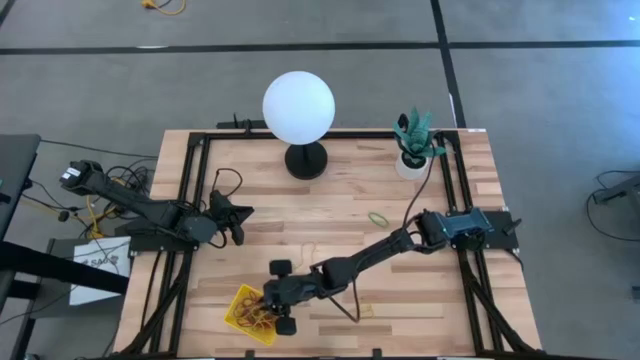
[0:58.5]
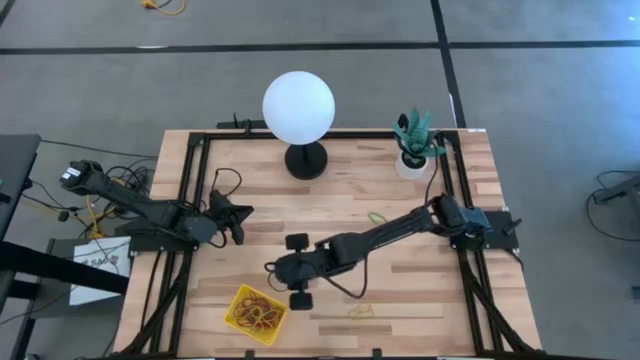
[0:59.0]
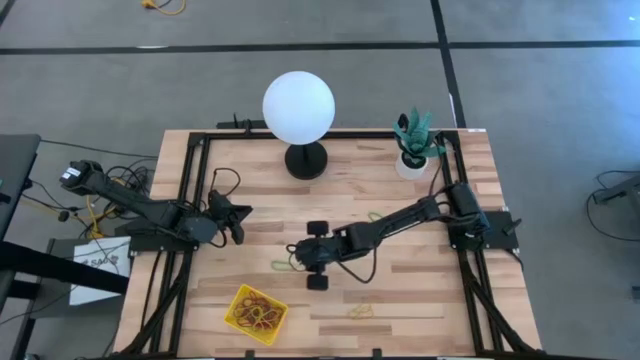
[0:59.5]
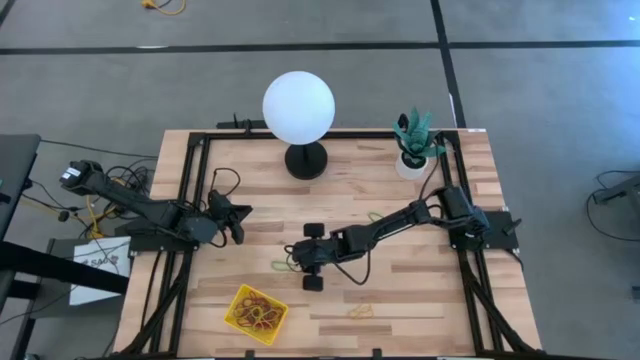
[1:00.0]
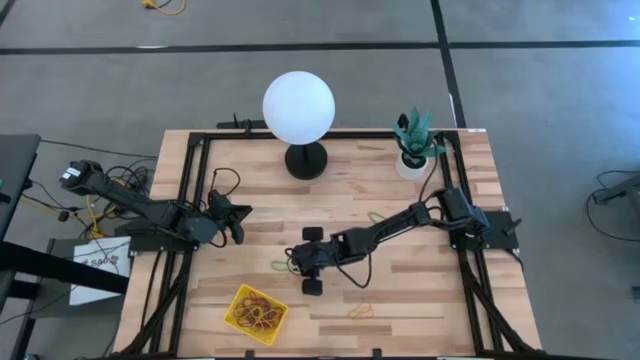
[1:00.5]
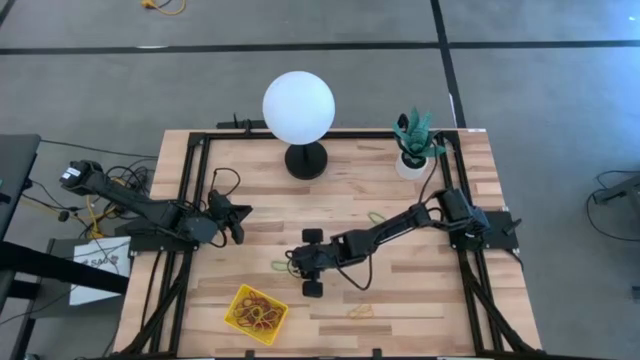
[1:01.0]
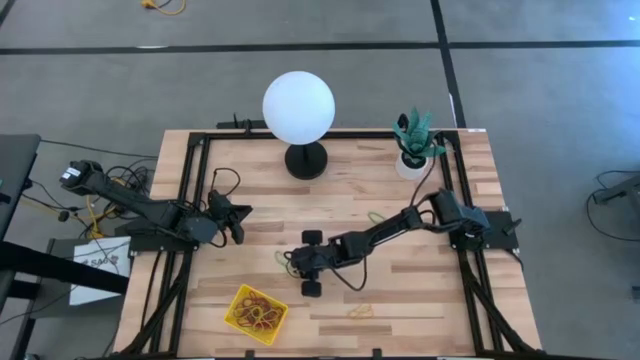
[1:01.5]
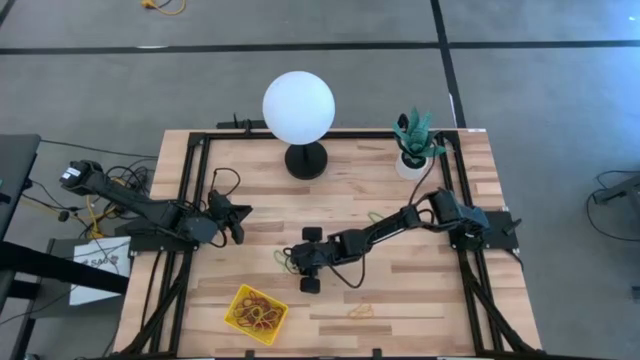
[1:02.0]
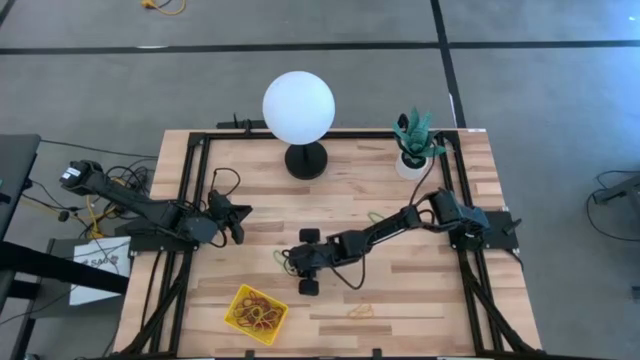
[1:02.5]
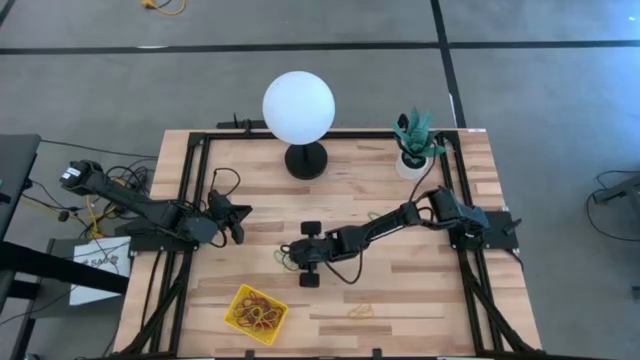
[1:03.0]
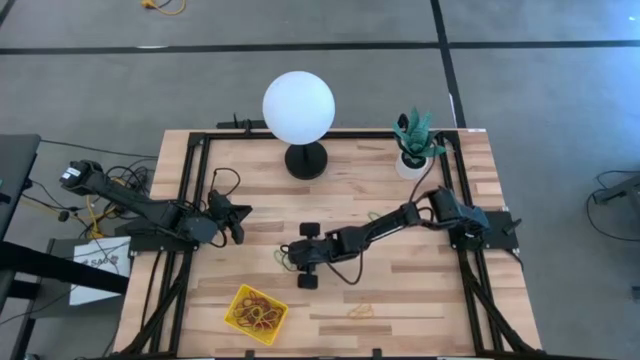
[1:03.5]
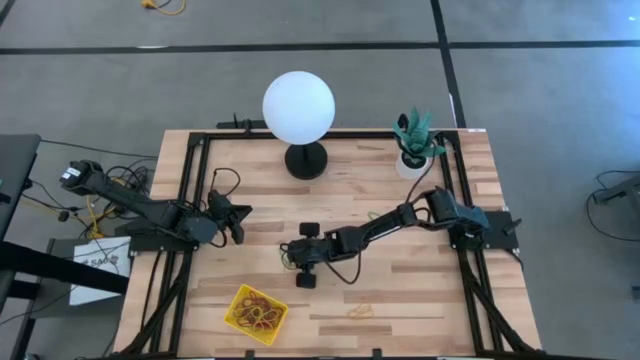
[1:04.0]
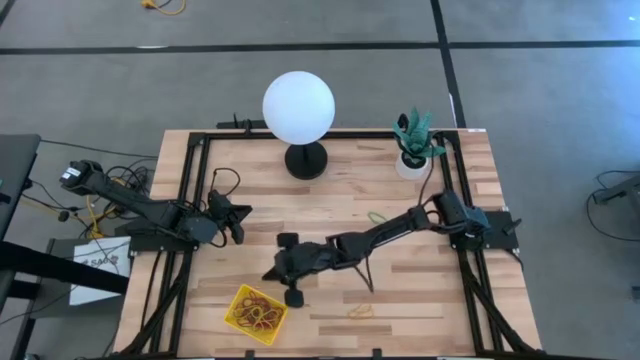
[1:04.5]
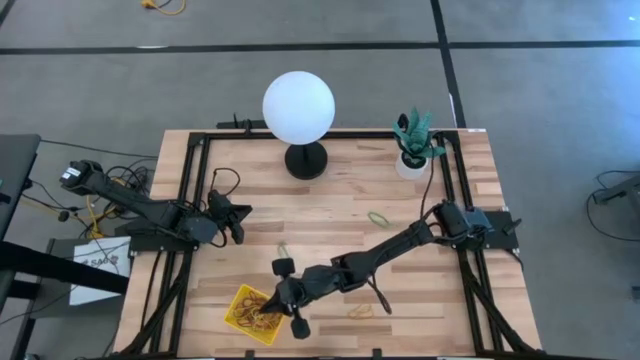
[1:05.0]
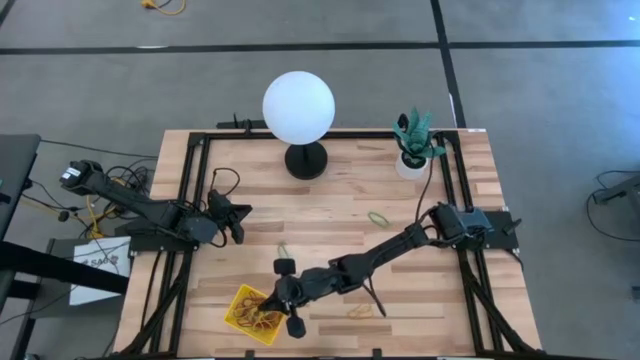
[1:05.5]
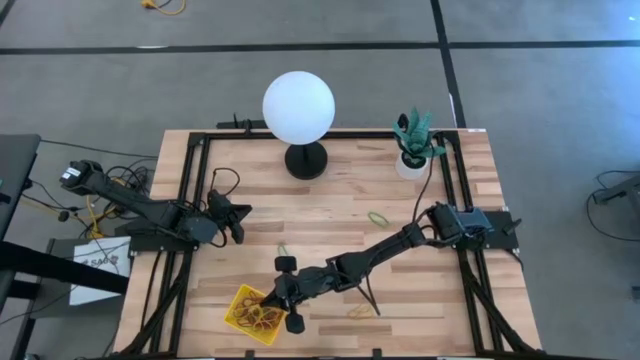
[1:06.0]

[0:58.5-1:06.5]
Task: Pick and place items into bin
Put the yellow rubber band into the yellow bin

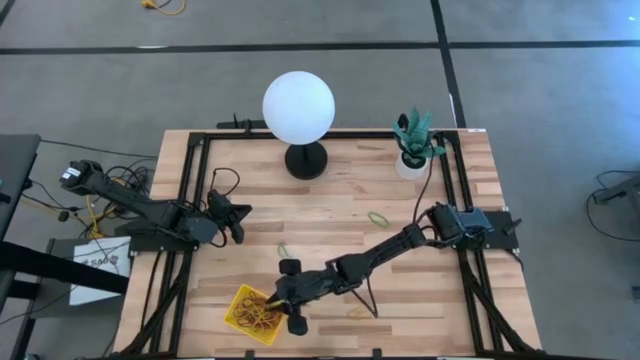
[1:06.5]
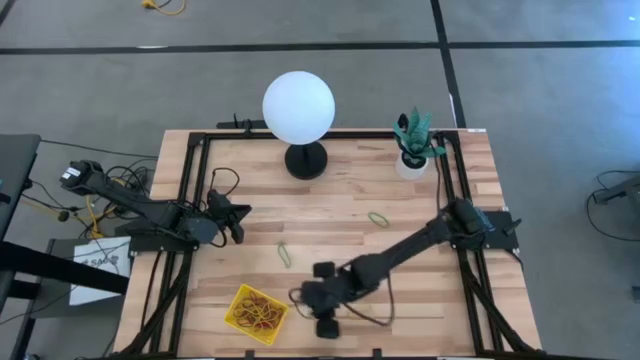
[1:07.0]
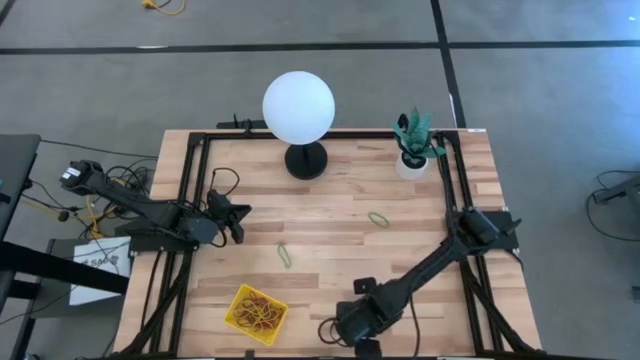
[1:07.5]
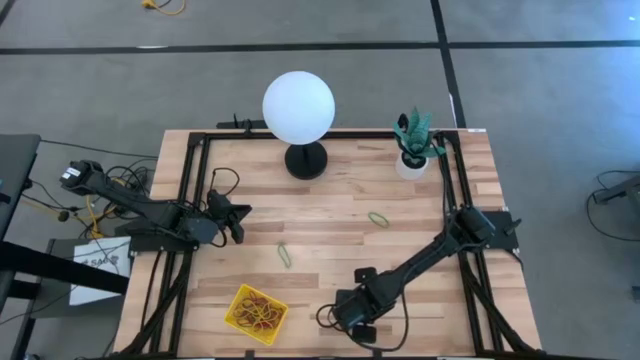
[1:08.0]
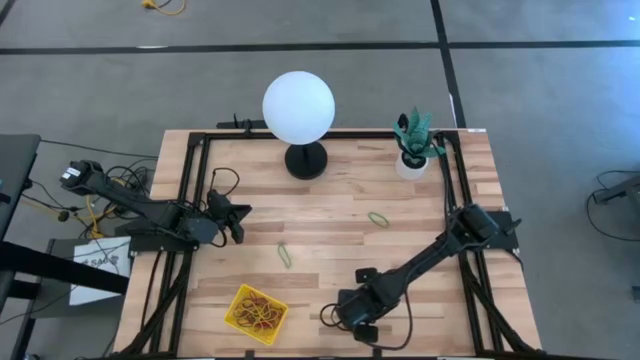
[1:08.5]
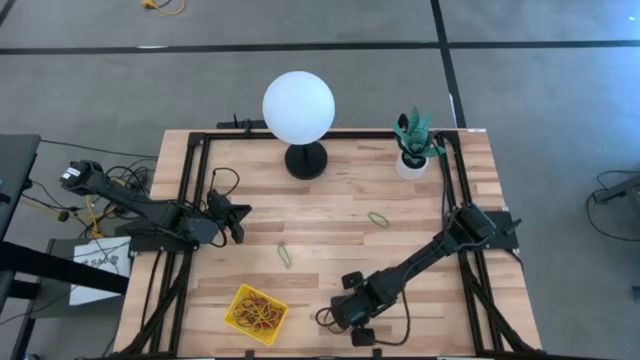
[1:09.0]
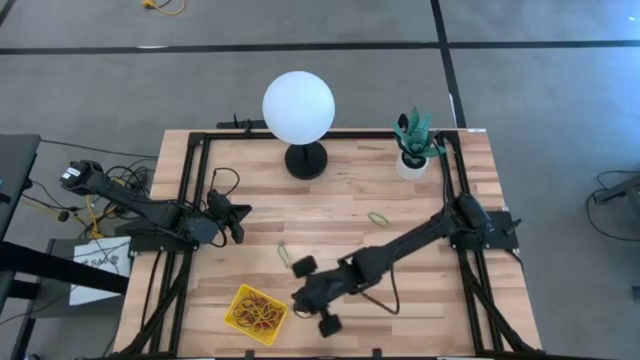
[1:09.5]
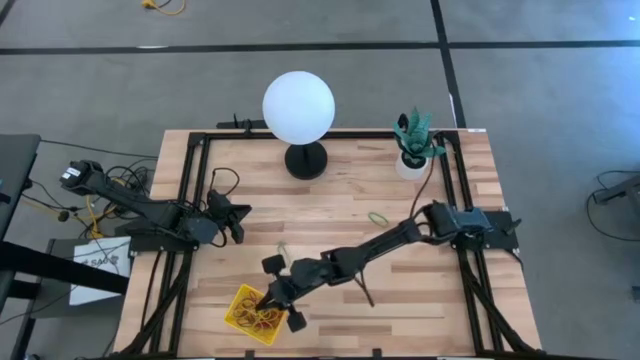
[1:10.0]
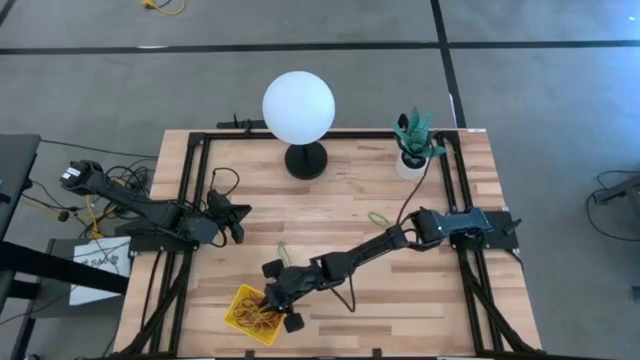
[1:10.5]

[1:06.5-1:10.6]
Put the yellow rubber band into the yellow bin

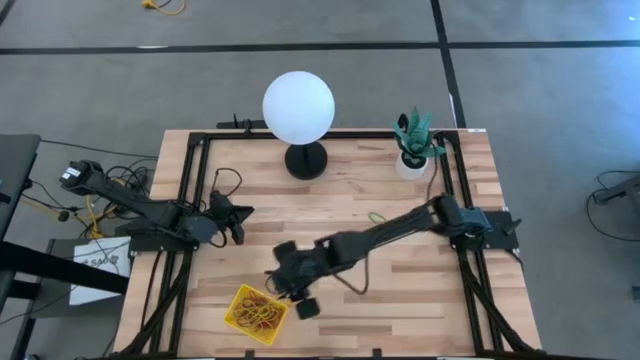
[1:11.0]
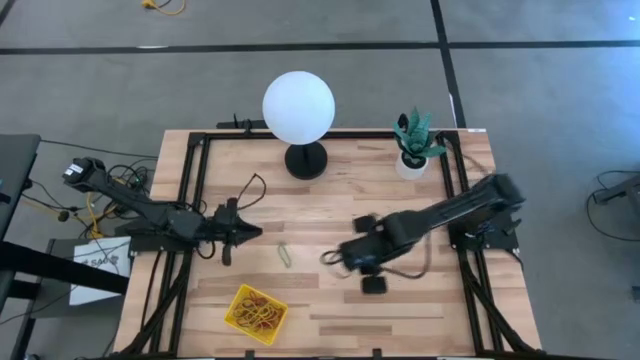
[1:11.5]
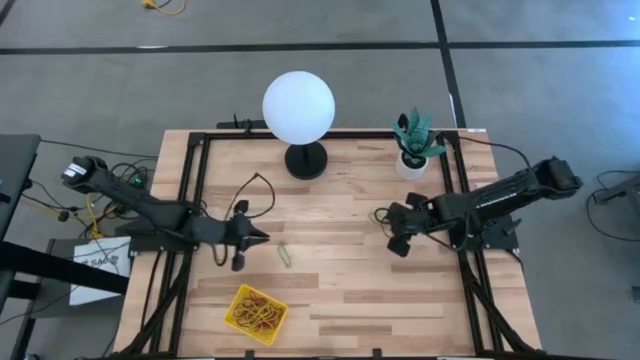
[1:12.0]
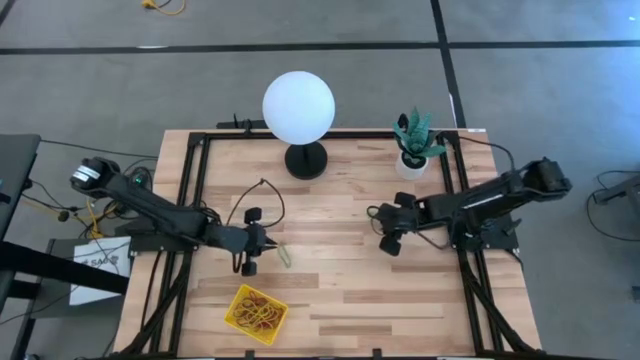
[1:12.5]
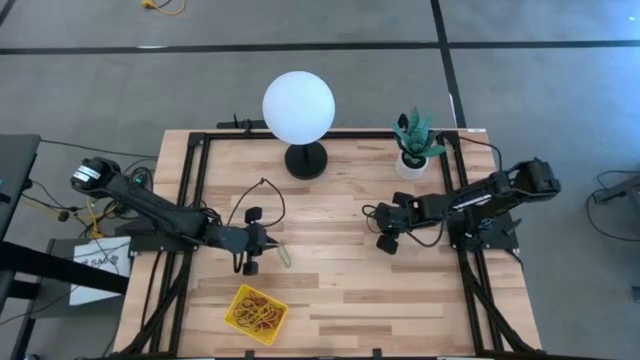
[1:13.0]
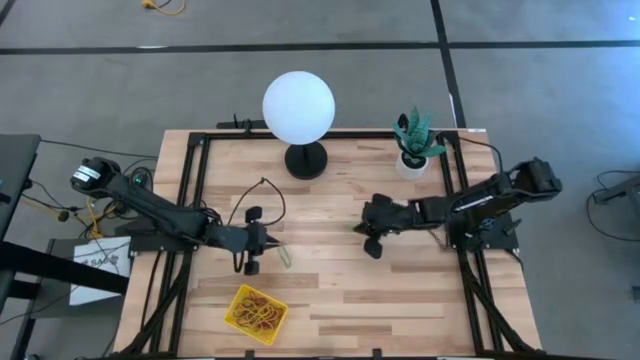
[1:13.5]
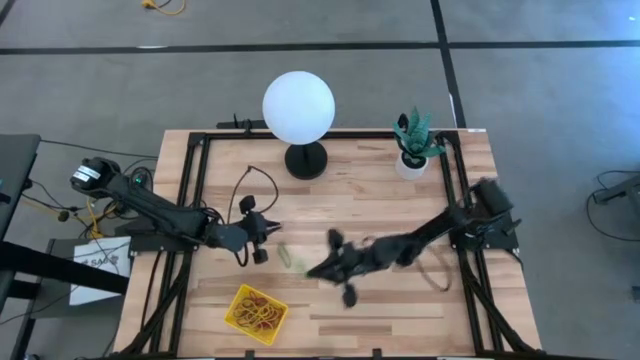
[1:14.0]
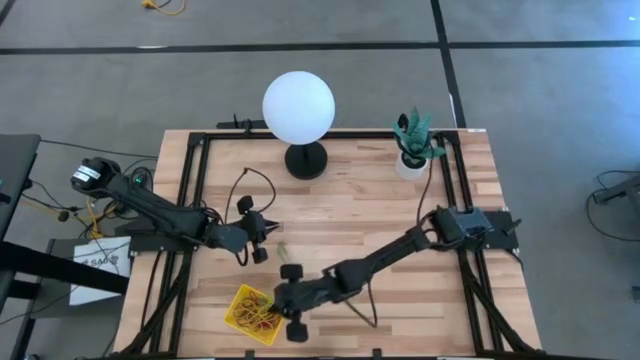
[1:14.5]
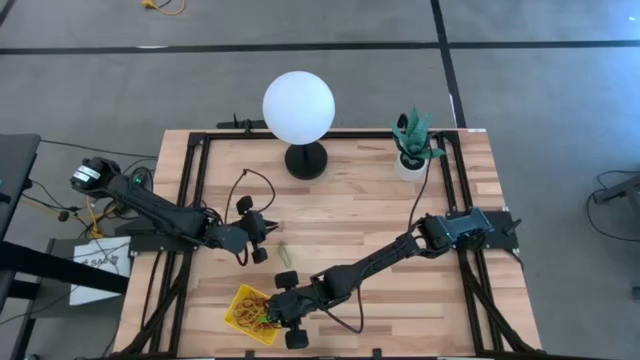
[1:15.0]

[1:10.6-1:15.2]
Put the green rubber band into the yellow bin

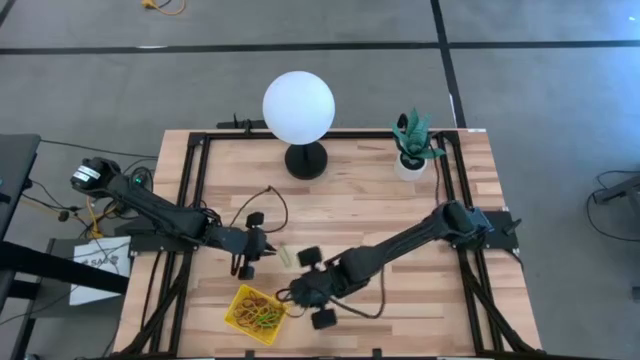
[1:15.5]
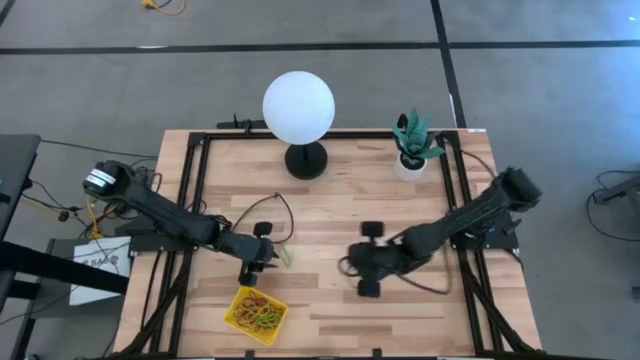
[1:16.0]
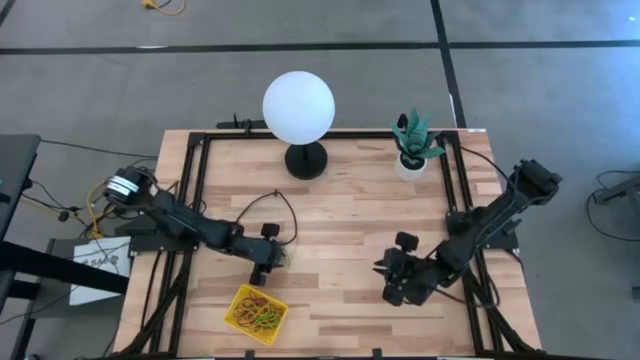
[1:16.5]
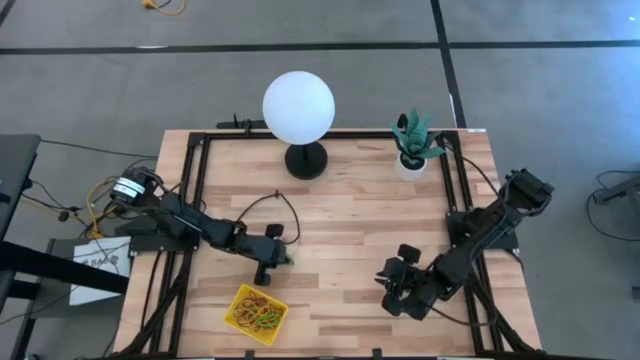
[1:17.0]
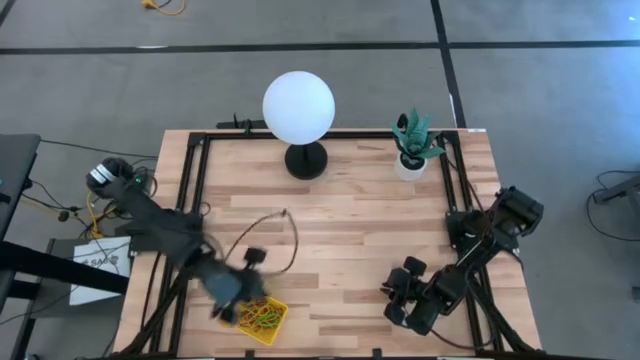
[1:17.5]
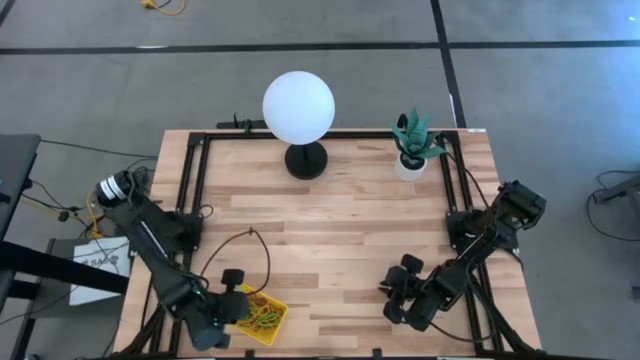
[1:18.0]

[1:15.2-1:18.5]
Put the green rubber band into the yellow bin

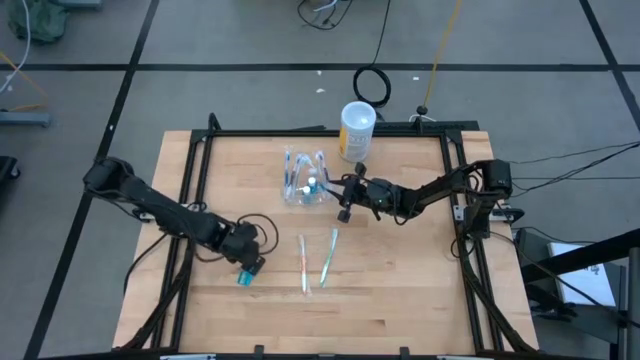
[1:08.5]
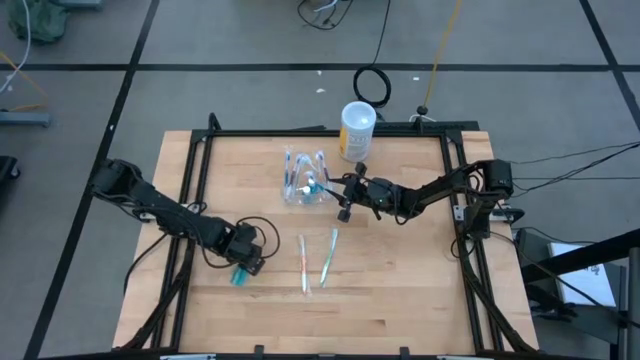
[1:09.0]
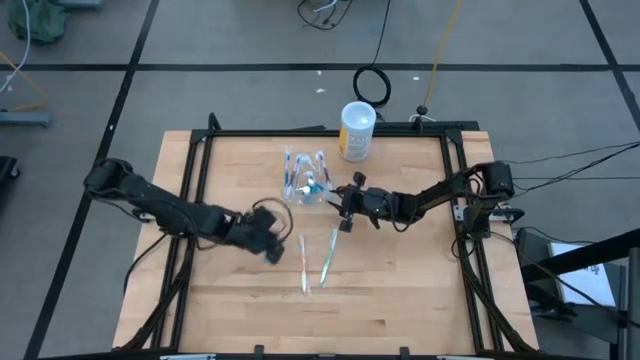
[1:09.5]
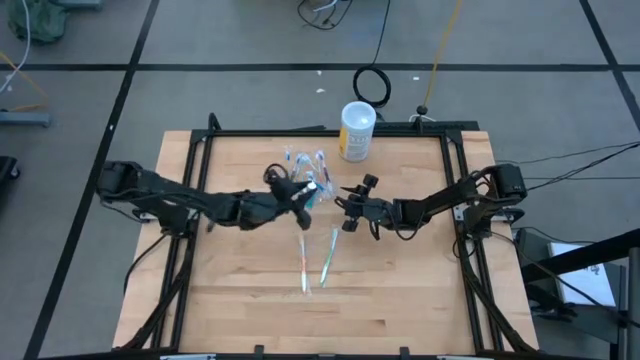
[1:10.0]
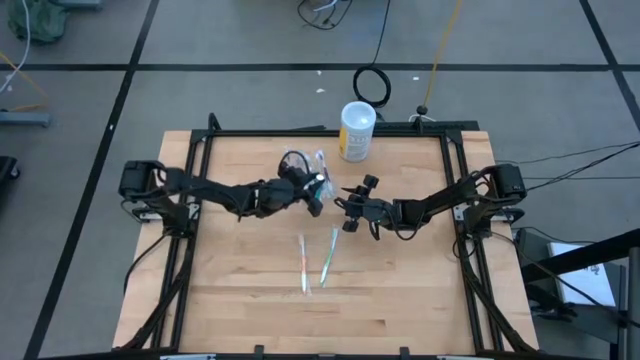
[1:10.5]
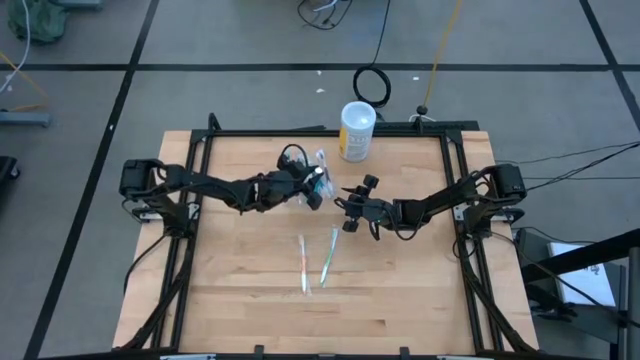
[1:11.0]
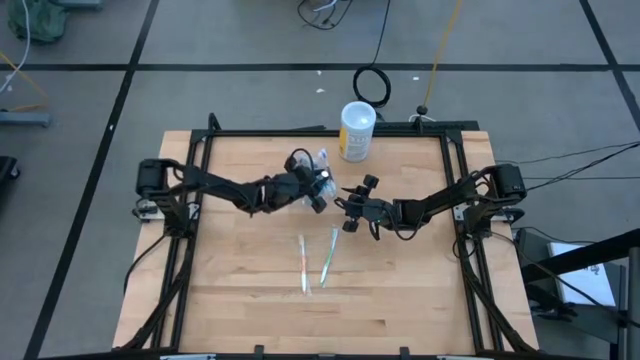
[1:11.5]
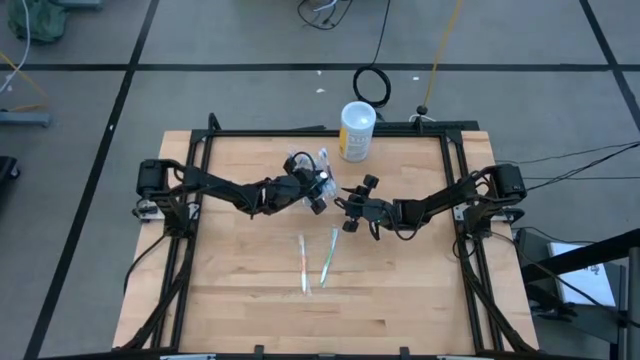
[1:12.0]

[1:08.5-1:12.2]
Task: Pick & Place toothbrushing station
Put the blue mouthwash bottle into the transparent organizer
